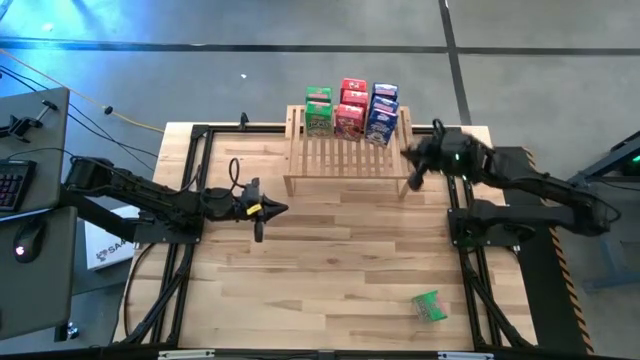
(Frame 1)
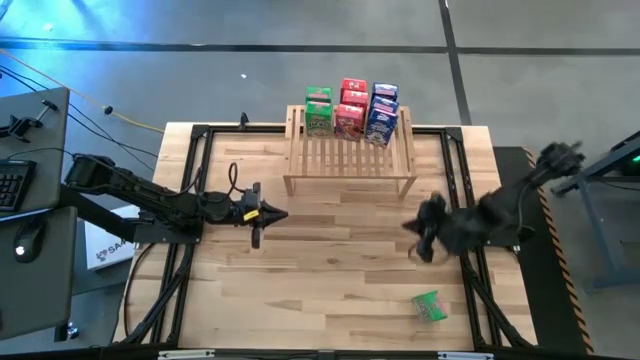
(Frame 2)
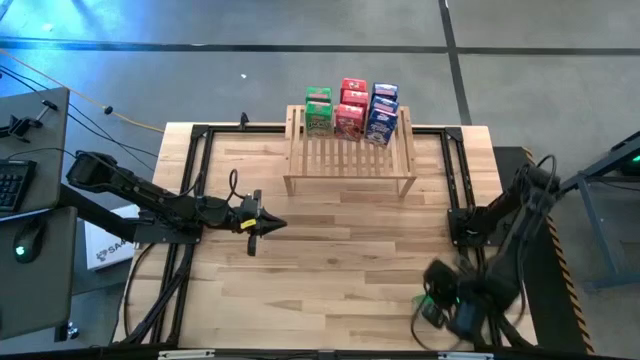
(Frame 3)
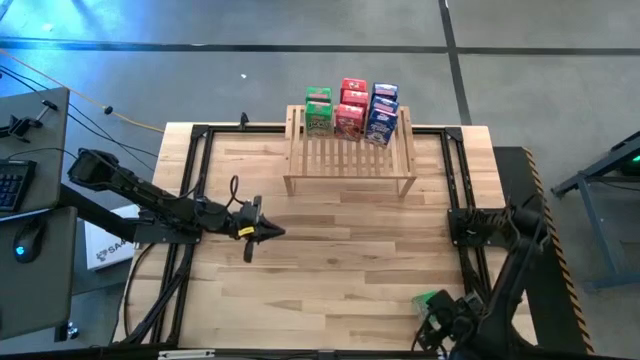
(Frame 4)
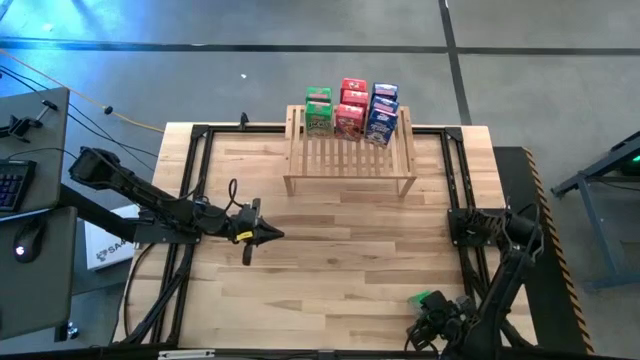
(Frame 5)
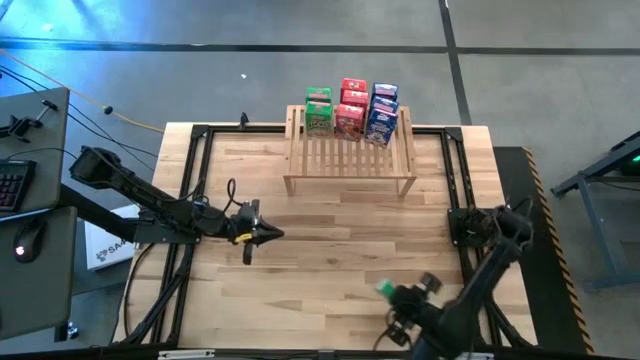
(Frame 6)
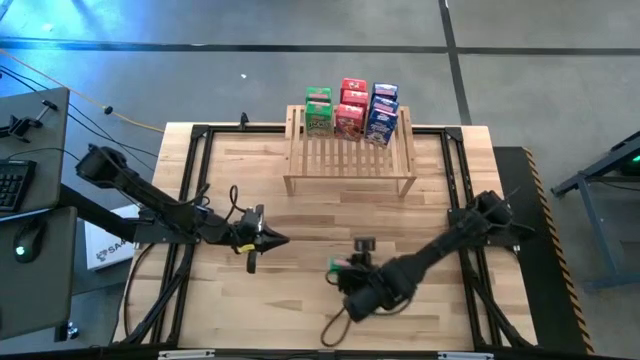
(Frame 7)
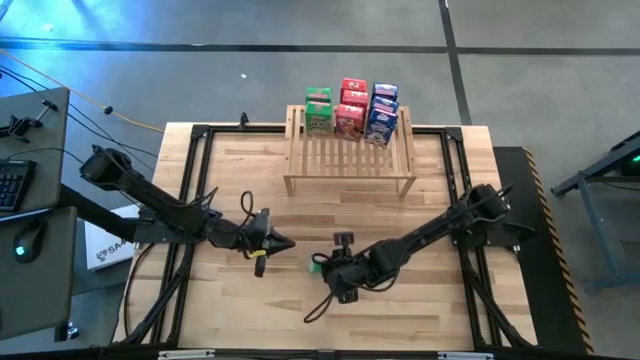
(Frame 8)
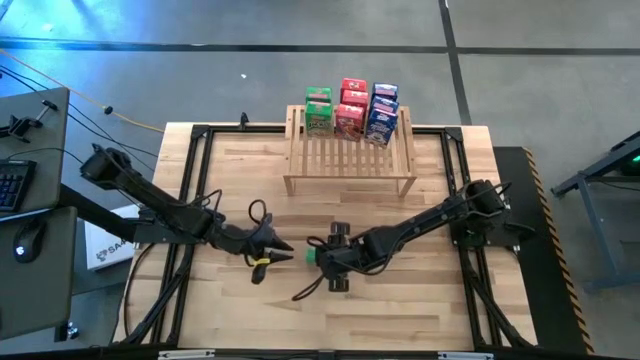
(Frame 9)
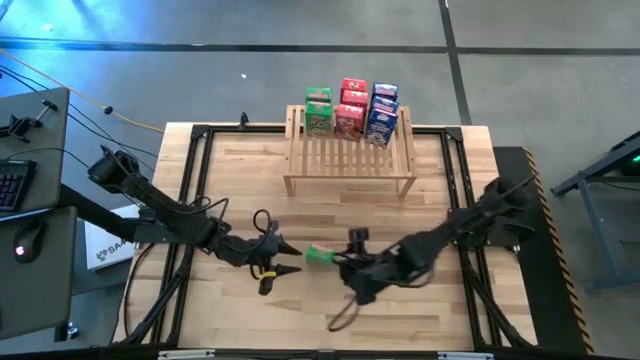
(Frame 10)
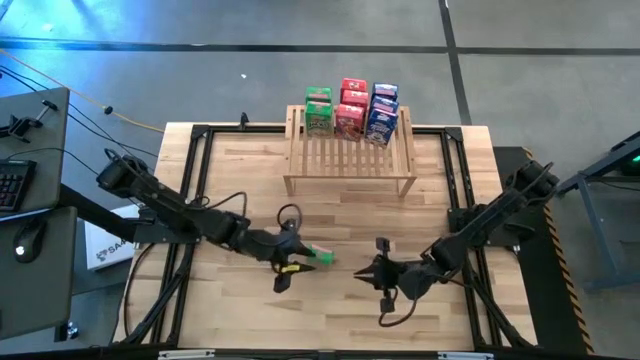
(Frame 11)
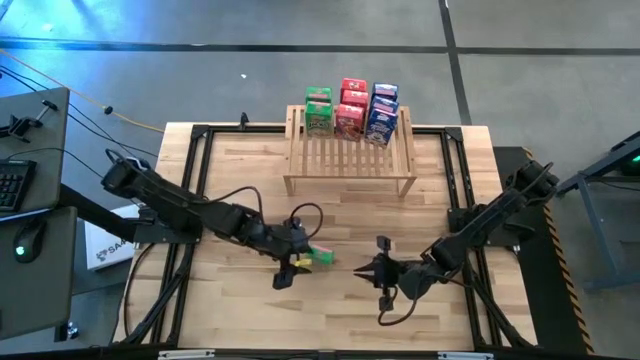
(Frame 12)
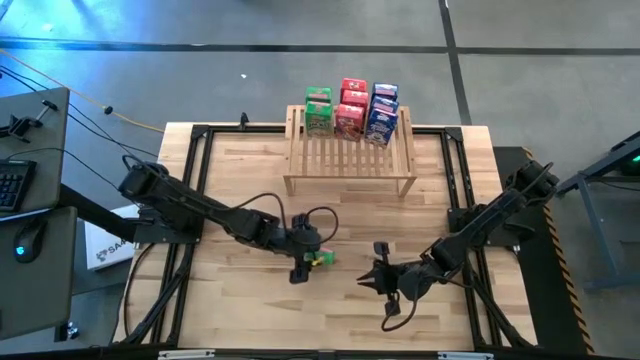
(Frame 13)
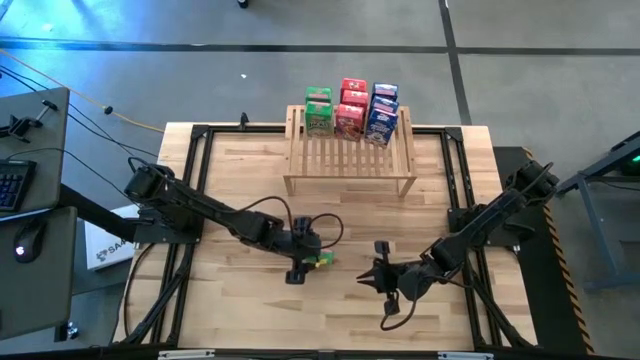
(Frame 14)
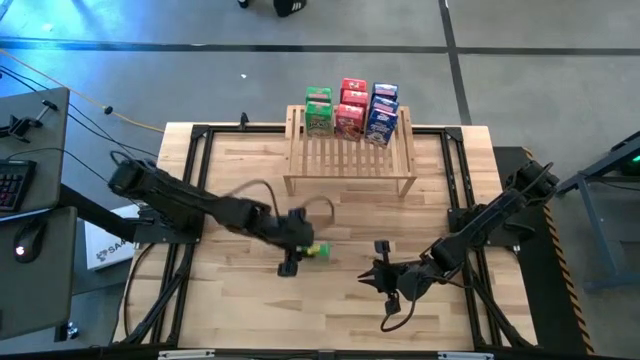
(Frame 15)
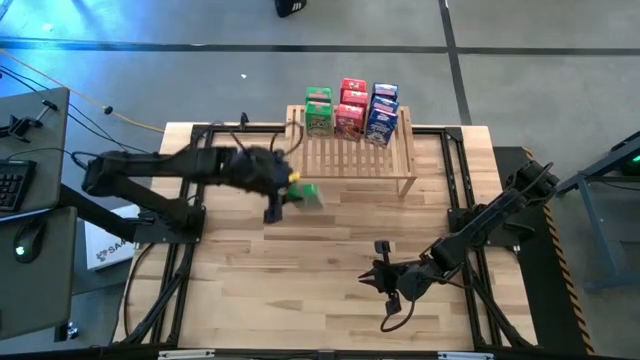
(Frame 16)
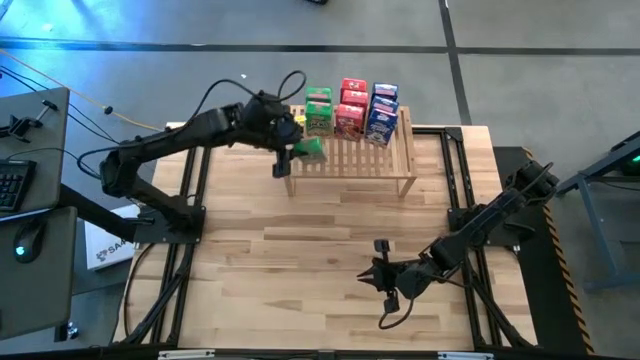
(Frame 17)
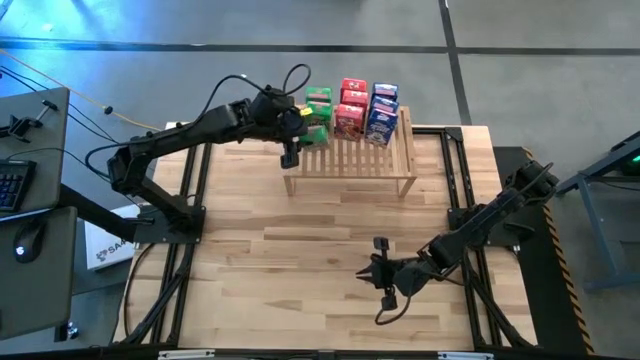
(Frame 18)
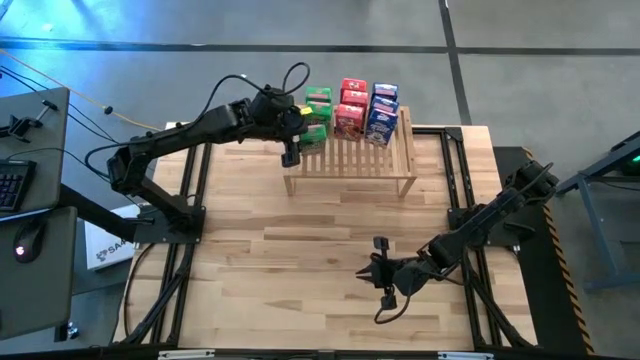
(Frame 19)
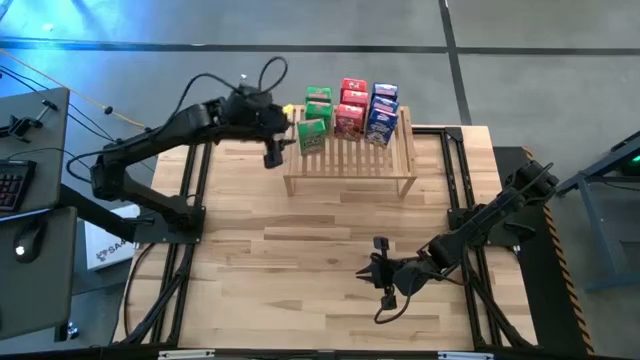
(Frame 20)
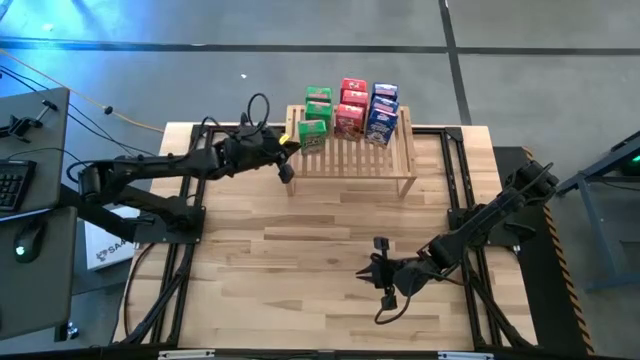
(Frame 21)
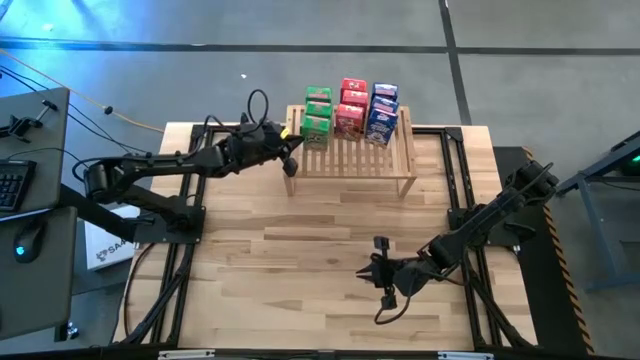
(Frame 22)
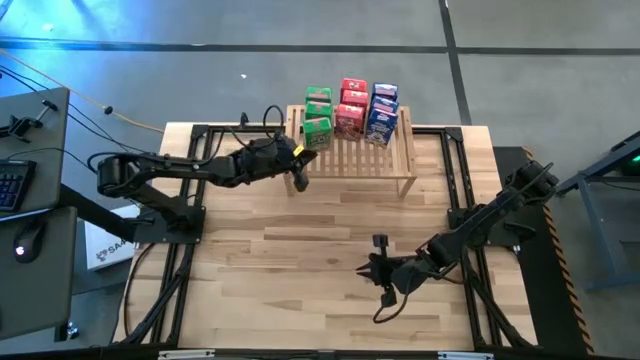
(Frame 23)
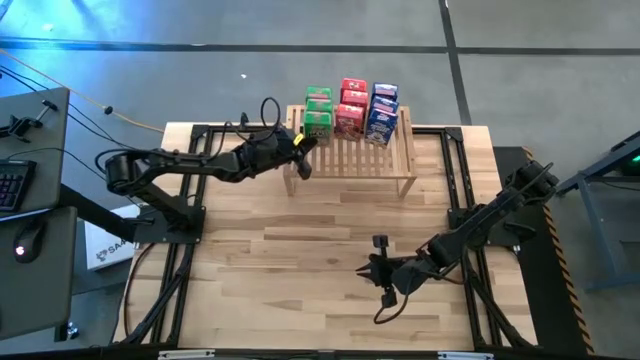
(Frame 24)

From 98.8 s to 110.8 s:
Task: Stack cereal on shelf
Put the green cereal box on the shelf aligned with the other green cereal boxes

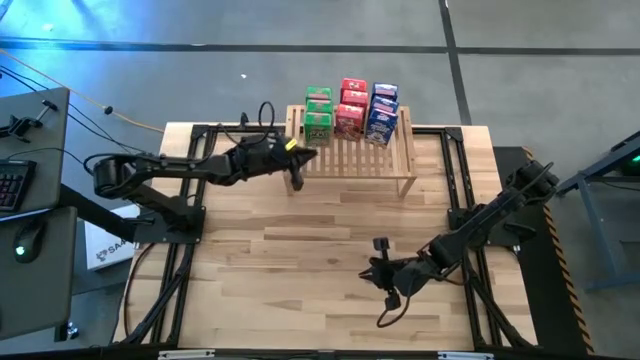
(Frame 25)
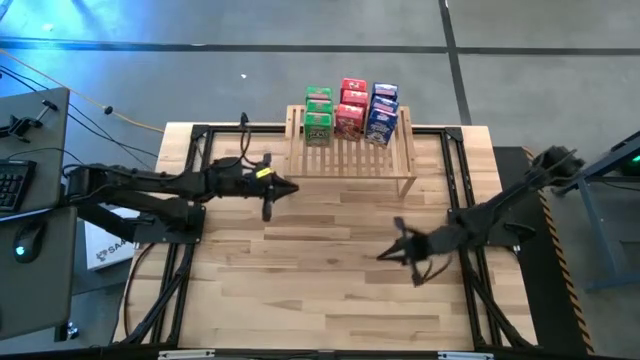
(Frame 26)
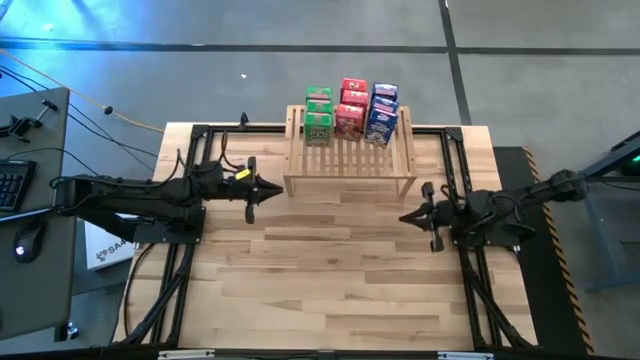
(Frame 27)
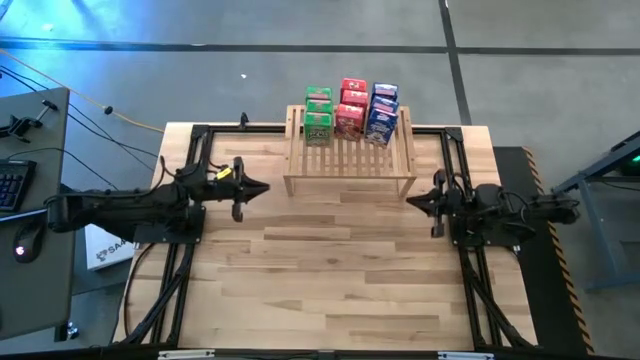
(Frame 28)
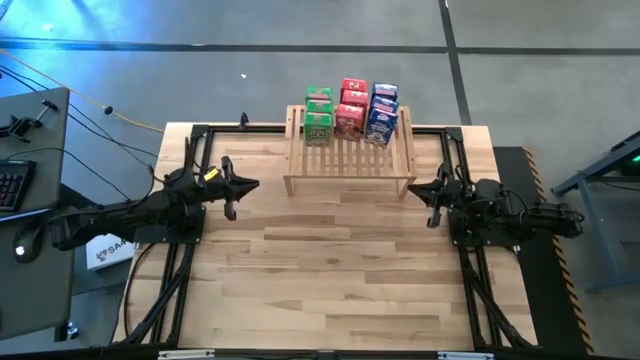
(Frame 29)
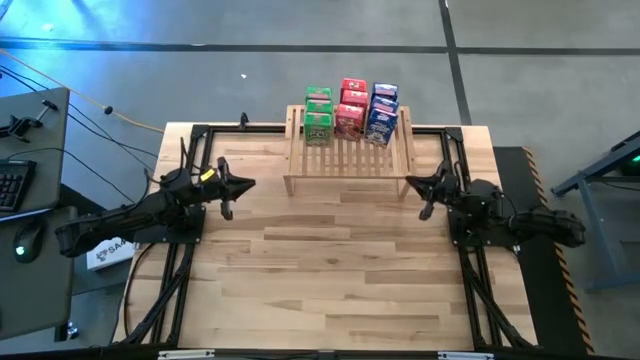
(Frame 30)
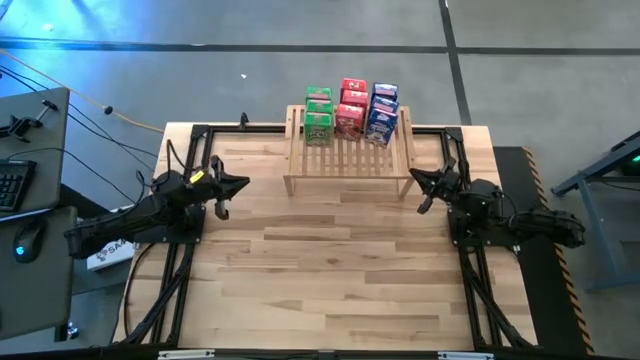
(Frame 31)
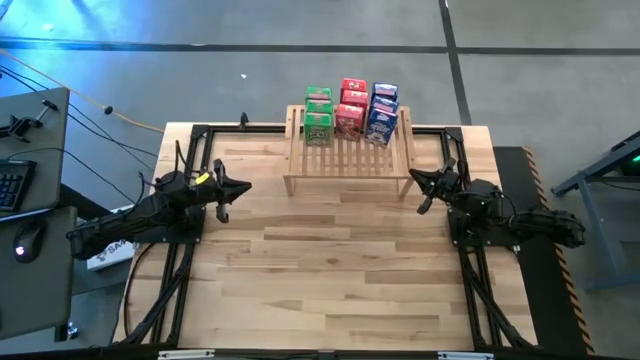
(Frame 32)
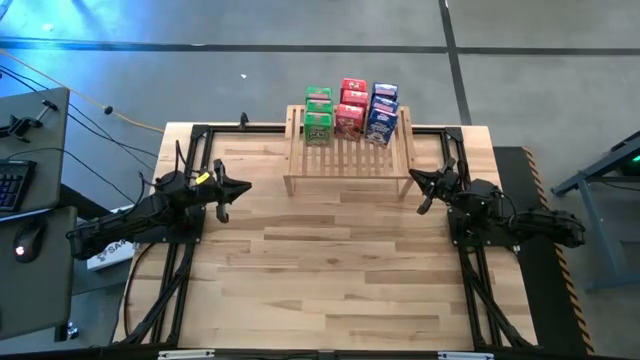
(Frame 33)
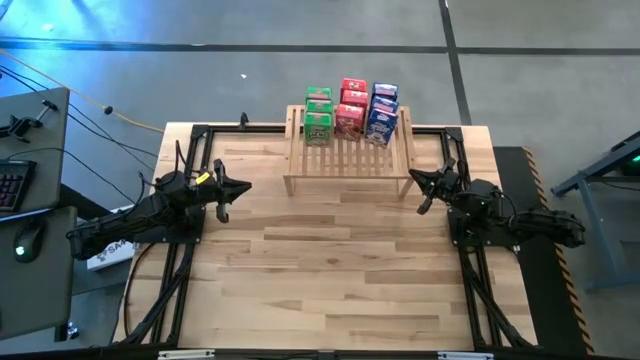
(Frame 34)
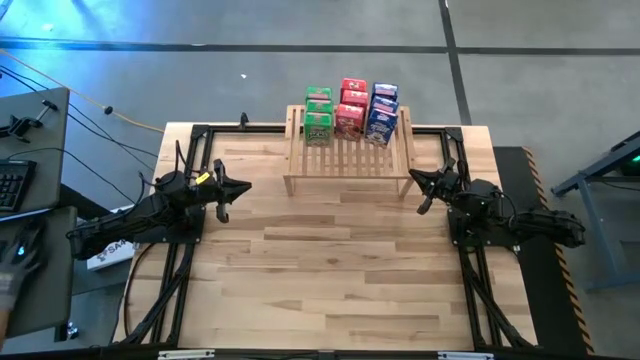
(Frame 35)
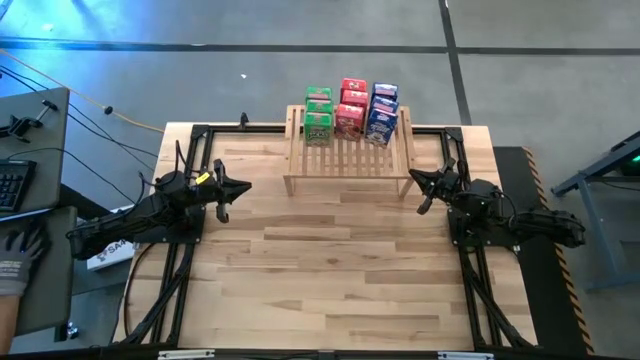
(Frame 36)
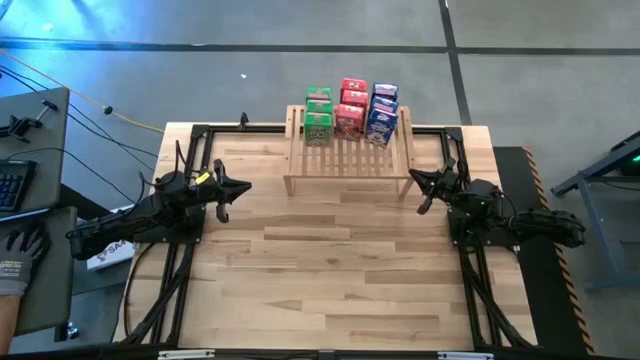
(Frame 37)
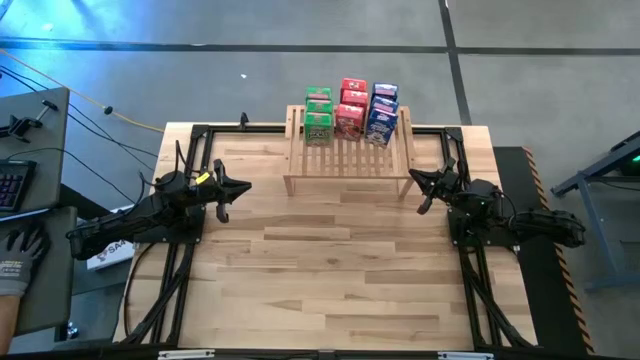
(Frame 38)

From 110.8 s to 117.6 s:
Return to Home Position

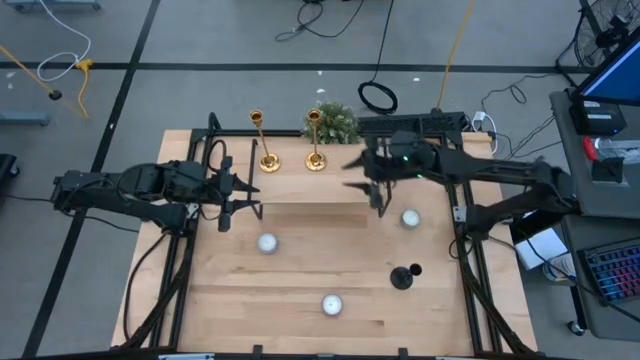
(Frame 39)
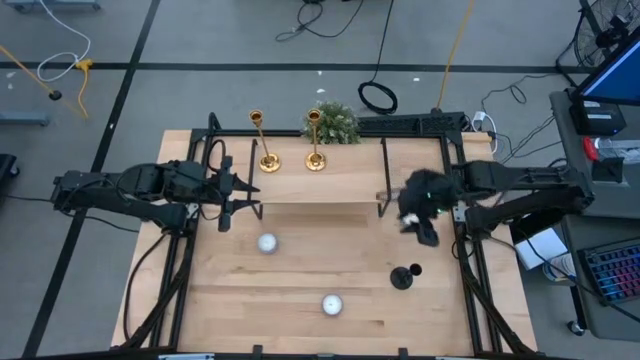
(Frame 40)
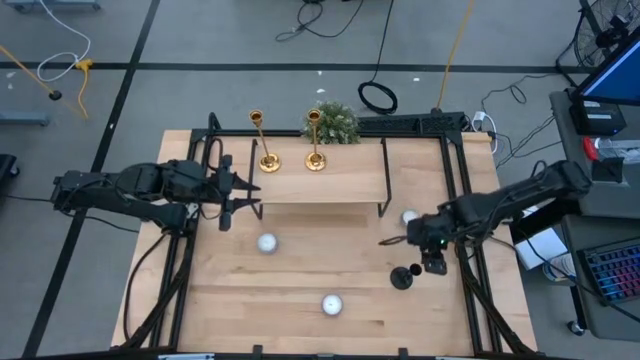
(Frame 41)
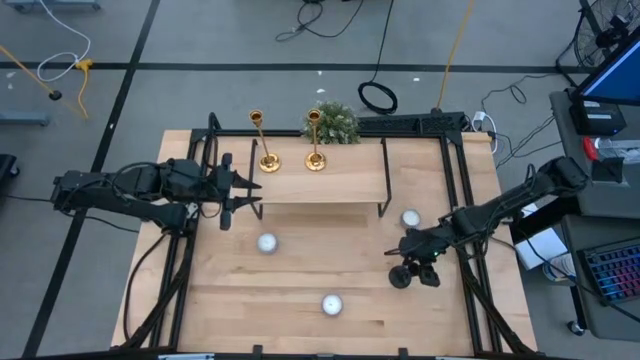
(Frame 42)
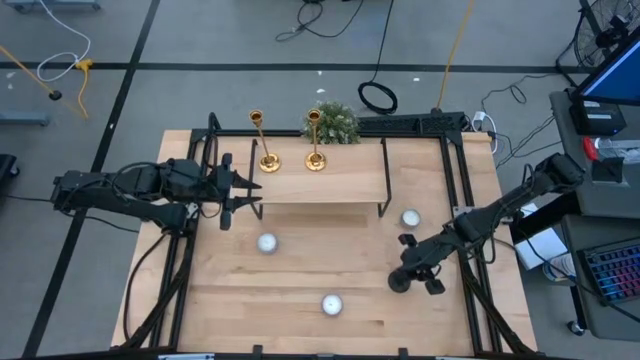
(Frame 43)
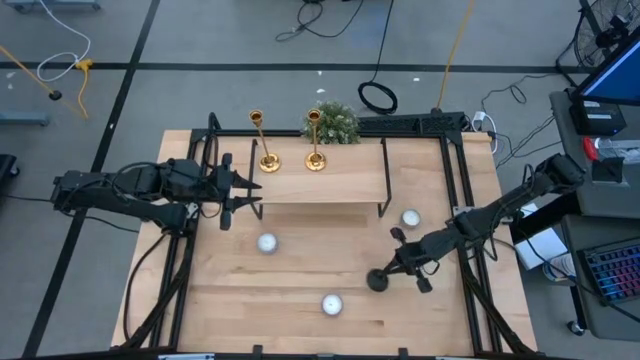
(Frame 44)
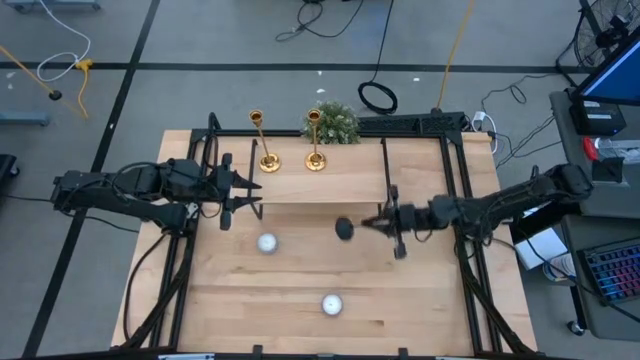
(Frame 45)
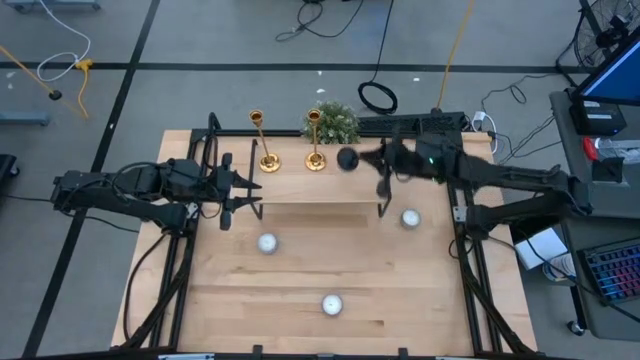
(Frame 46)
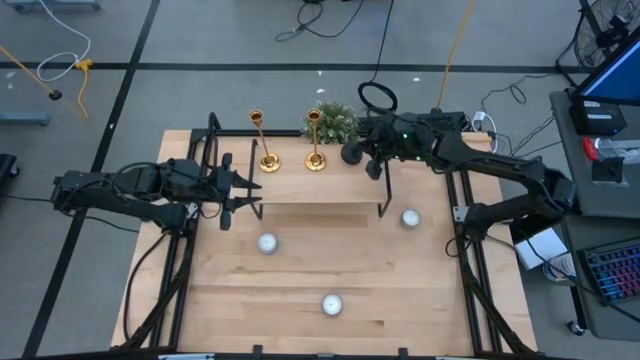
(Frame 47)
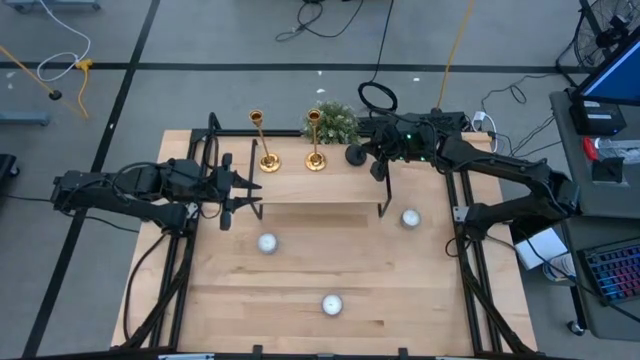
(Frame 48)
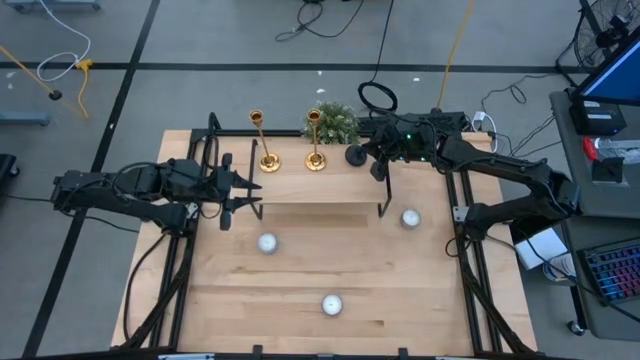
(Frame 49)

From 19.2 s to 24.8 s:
Task: Pick & Place candle stick holders
Align the black candle holder with the gold candle holder on the shelf
